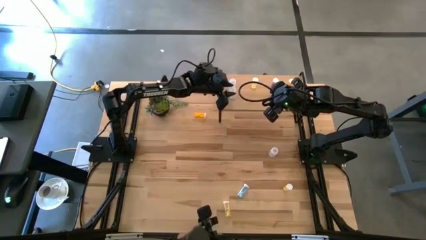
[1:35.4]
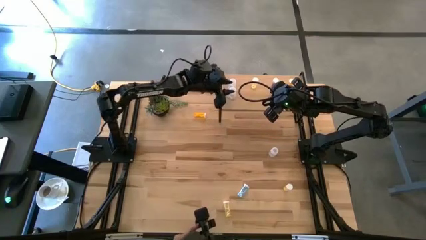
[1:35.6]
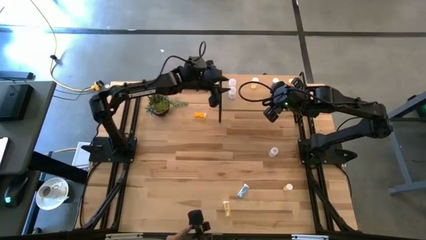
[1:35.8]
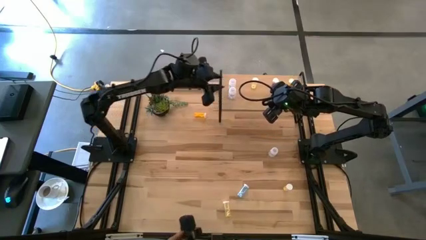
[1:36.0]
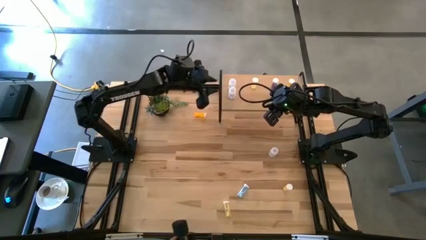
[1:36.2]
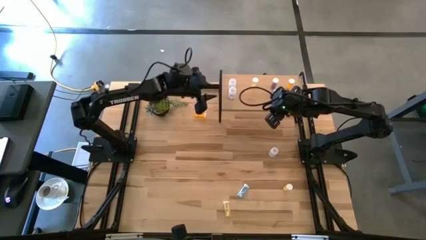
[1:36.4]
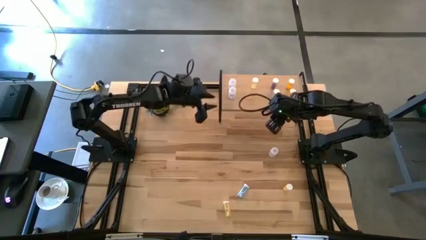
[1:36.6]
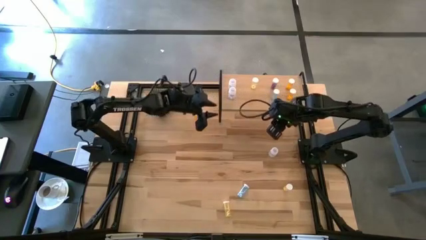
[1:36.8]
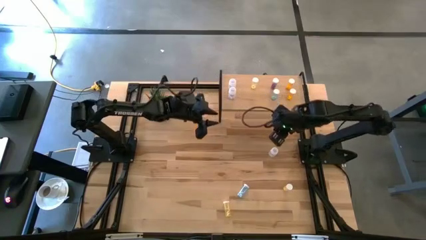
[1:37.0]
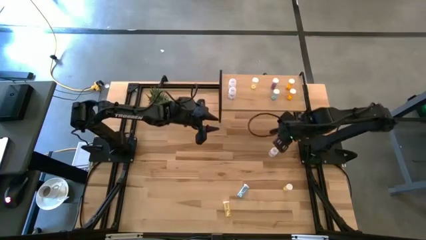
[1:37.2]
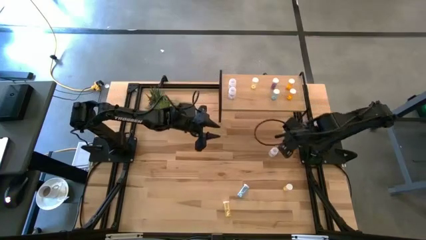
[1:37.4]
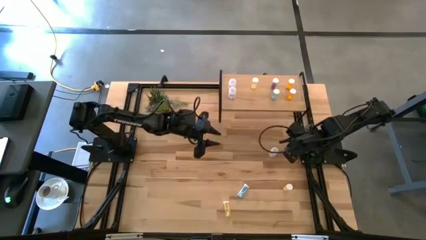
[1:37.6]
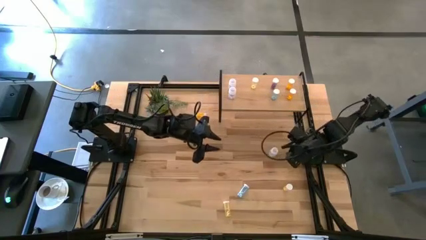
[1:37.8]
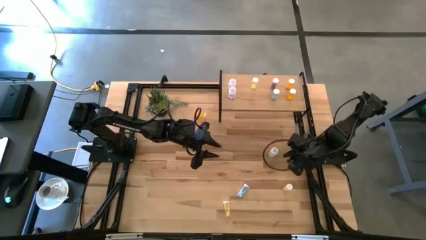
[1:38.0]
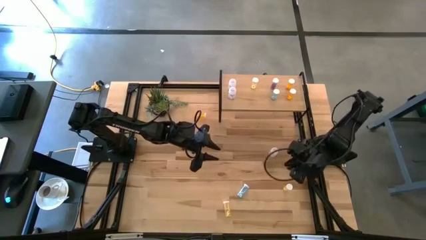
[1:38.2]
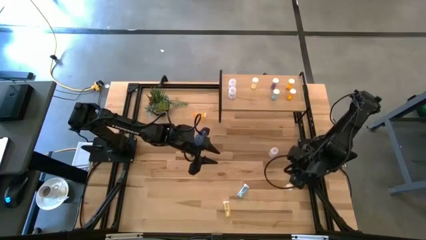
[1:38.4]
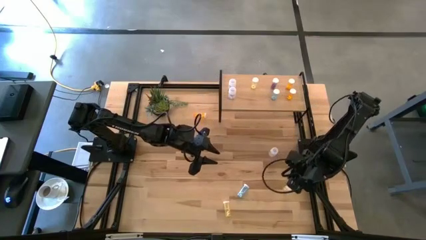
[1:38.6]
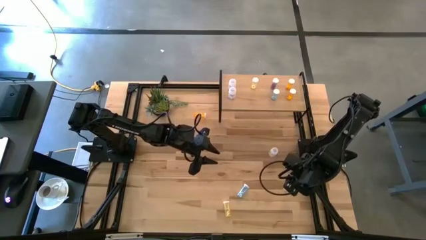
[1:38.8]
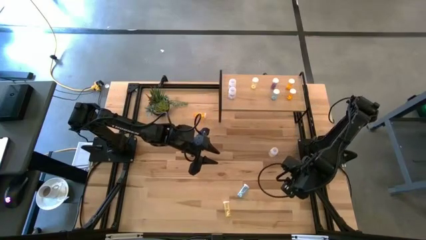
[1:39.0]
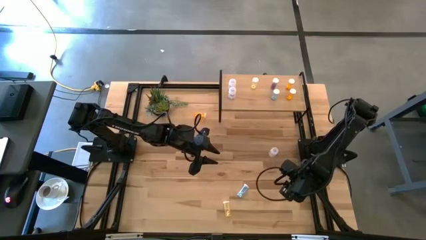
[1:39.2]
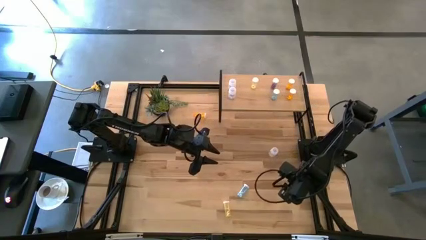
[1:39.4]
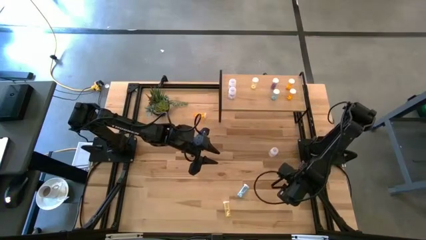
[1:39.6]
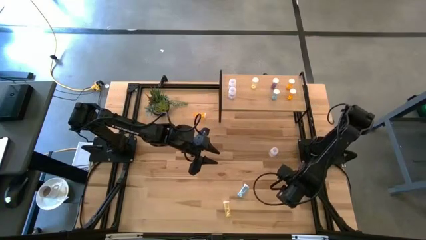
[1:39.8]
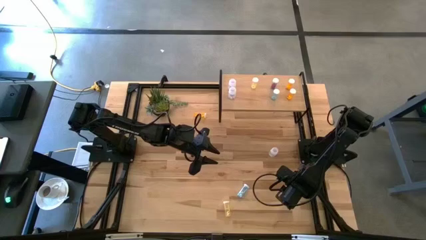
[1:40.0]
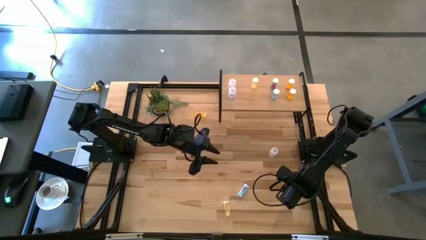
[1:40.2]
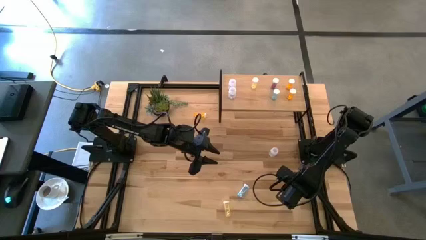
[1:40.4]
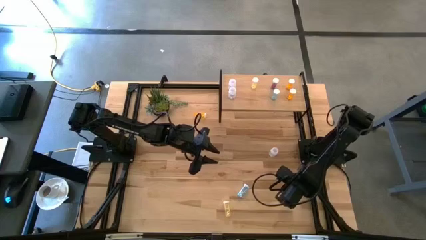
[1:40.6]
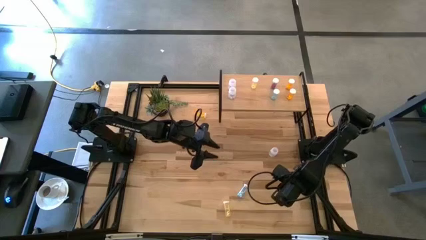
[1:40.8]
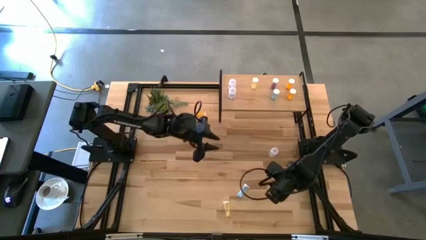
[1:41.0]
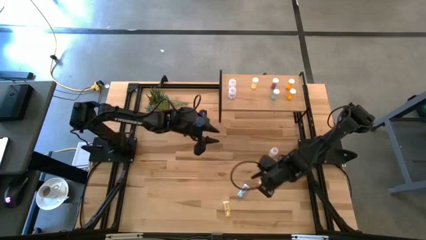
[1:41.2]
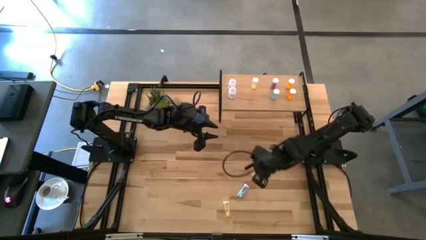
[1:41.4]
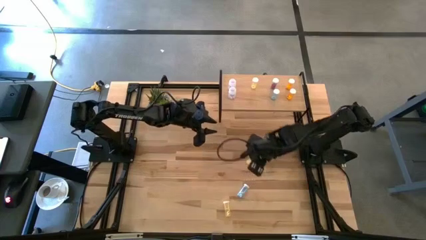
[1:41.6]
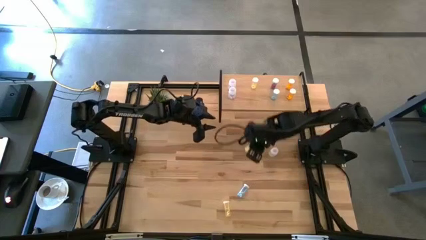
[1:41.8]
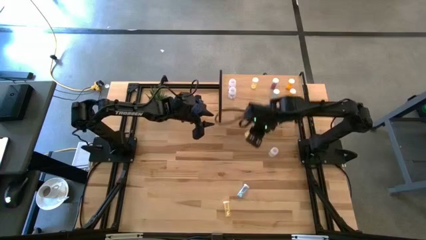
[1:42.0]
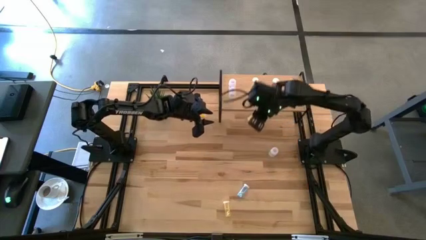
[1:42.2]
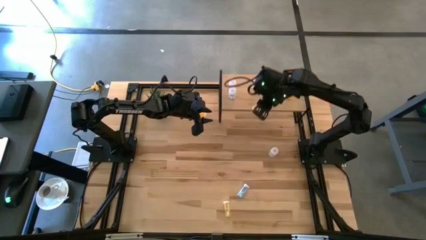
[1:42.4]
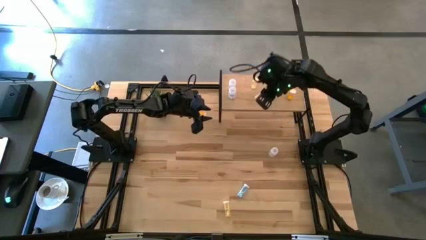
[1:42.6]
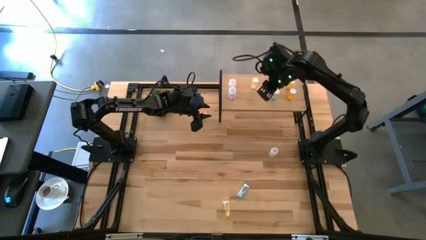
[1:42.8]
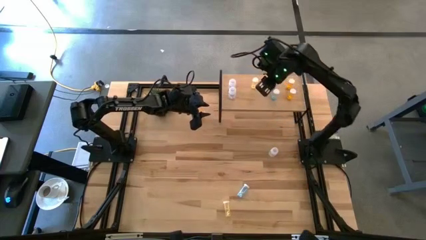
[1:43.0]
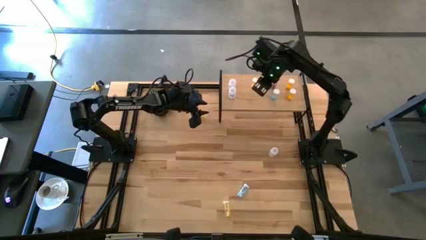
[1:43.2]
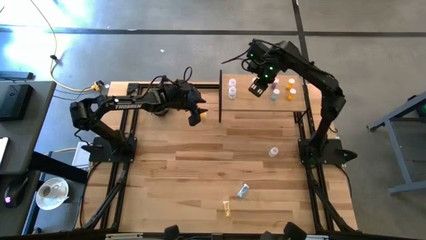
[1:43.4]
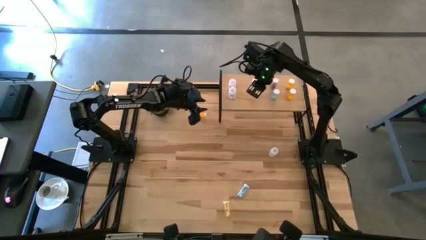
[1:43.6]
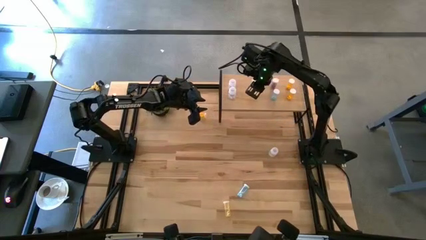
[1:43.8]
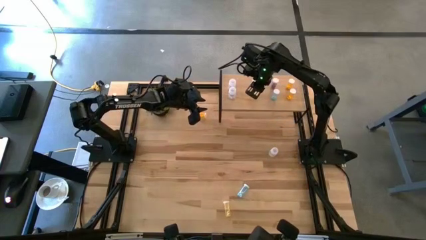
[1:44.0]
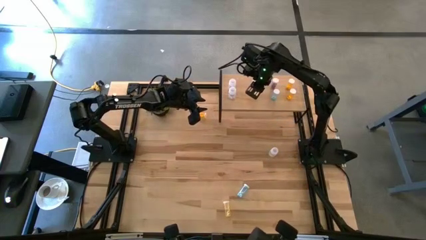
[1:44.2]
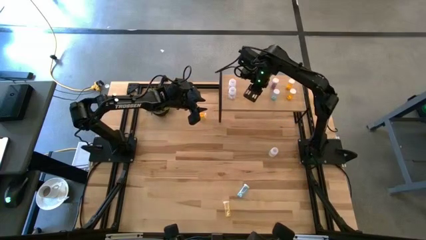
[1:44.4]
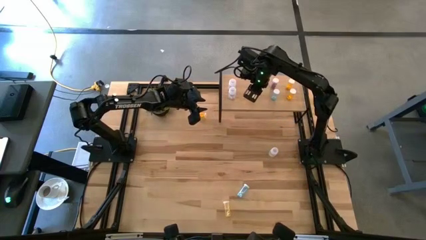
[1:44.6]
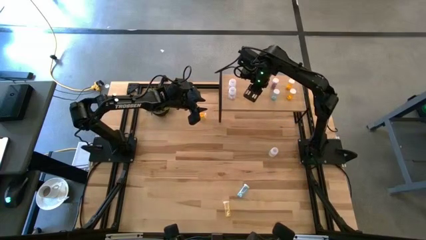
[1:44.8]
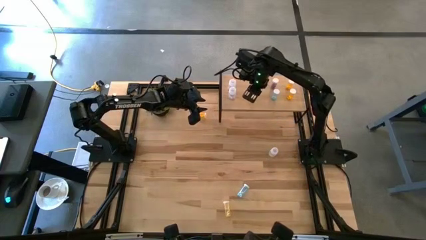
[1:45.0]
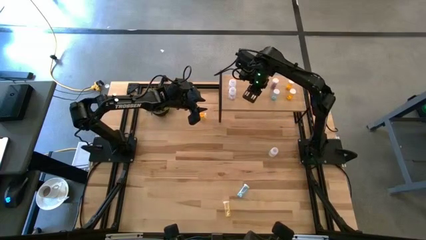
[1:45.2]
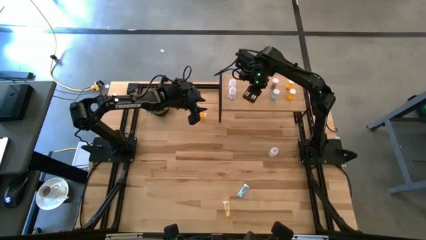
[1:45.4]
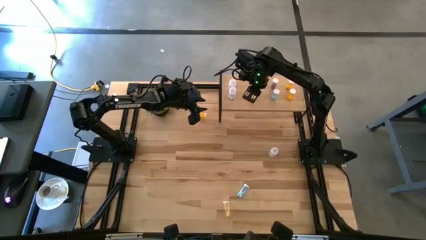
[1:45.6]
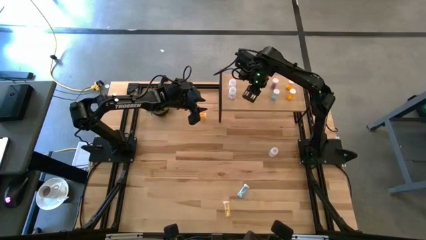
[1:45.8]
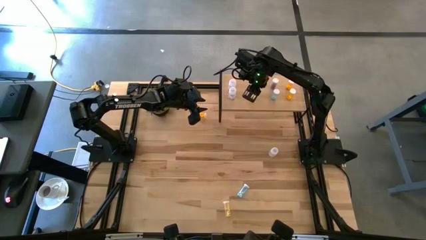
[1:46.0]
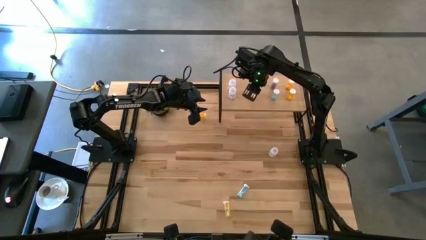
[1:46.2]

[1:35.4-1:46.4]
Task: Pick and place medicine bottles onto shelf by color
Put the right yellow pill bottle aligned with the other yellow pill bottle on the shelf

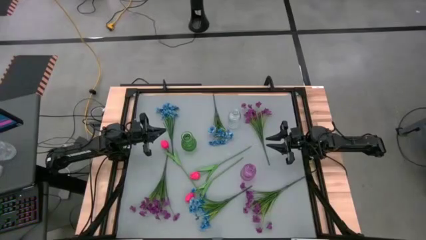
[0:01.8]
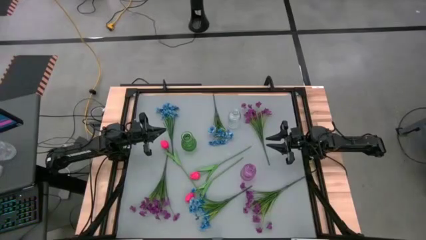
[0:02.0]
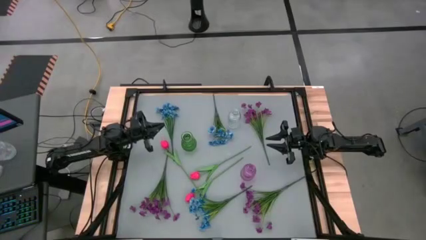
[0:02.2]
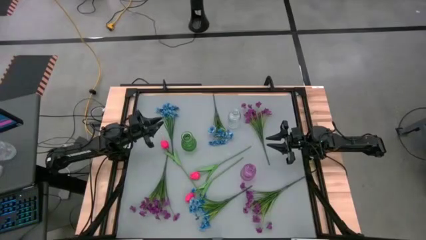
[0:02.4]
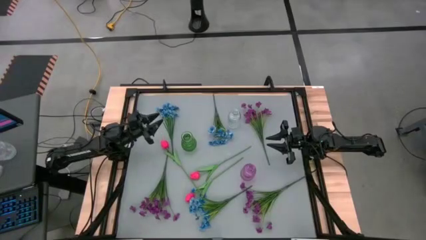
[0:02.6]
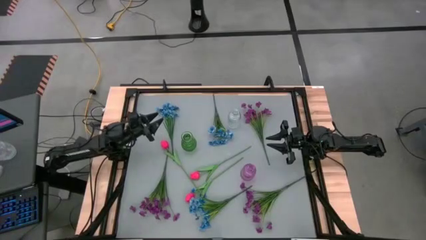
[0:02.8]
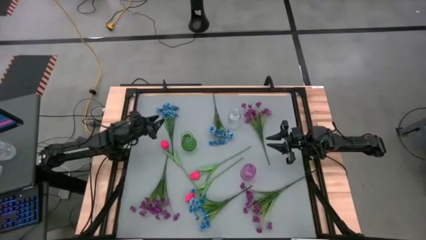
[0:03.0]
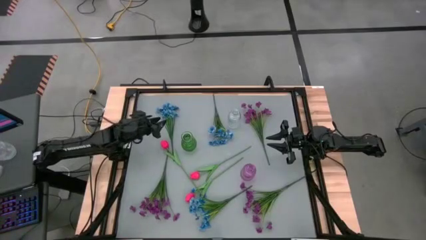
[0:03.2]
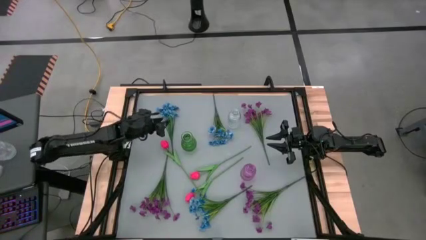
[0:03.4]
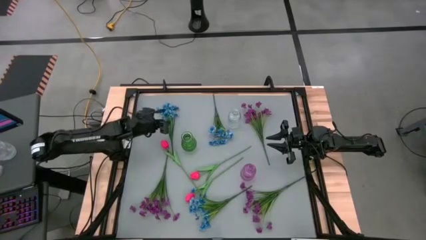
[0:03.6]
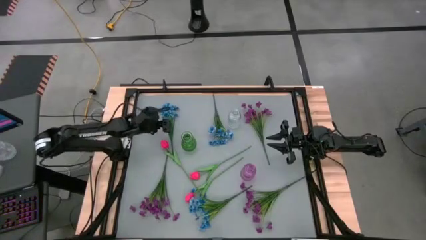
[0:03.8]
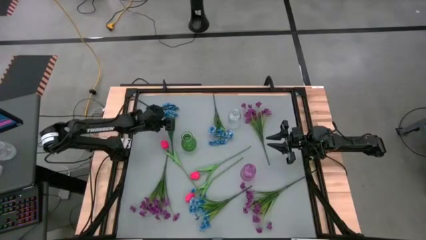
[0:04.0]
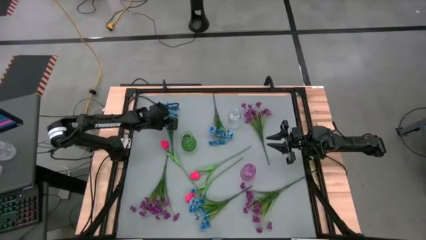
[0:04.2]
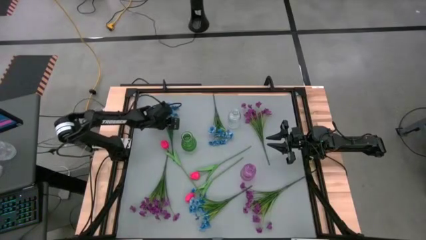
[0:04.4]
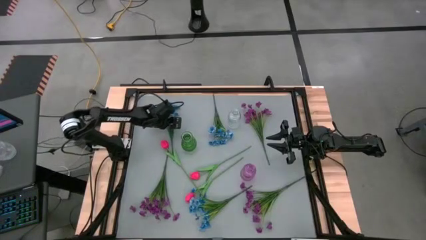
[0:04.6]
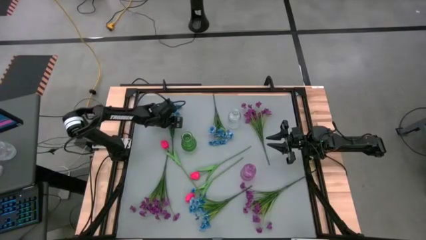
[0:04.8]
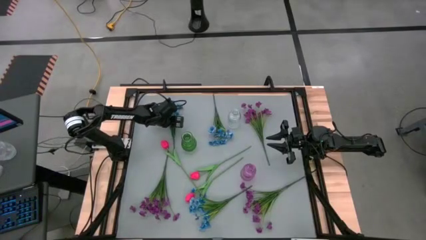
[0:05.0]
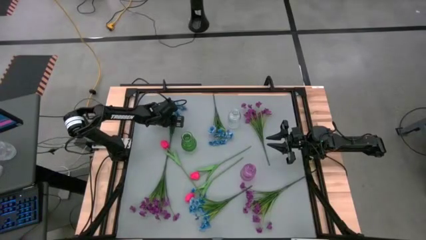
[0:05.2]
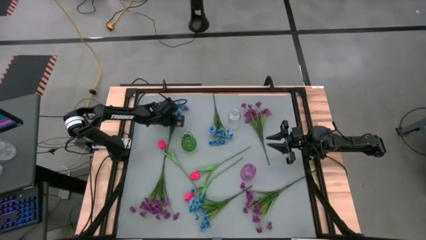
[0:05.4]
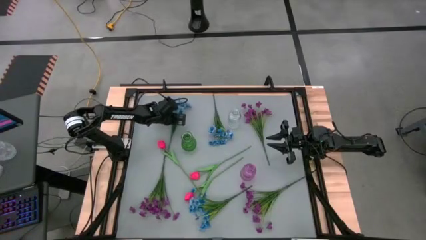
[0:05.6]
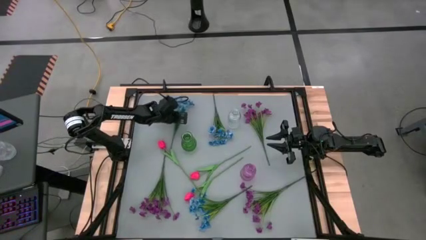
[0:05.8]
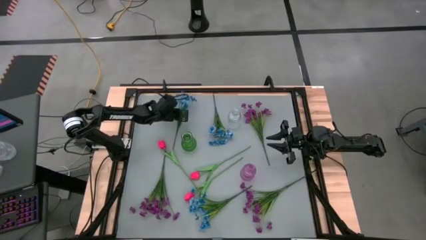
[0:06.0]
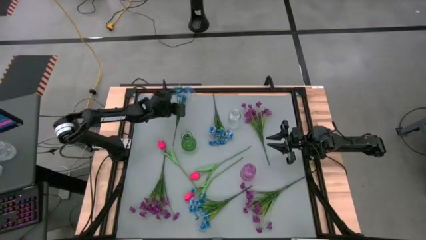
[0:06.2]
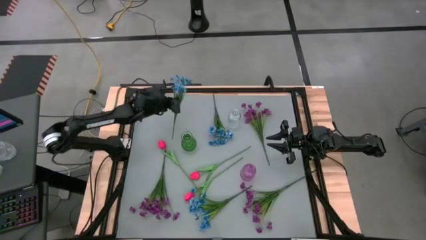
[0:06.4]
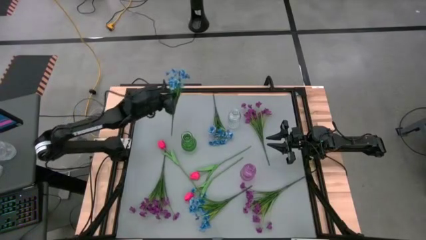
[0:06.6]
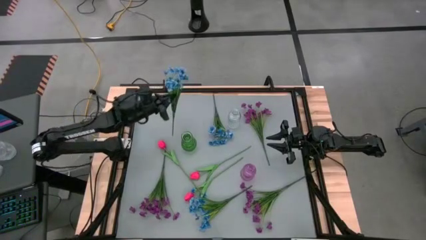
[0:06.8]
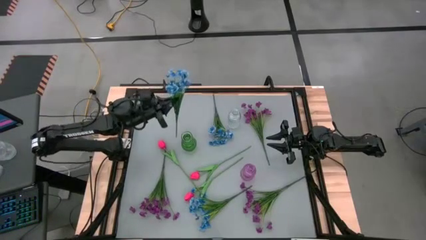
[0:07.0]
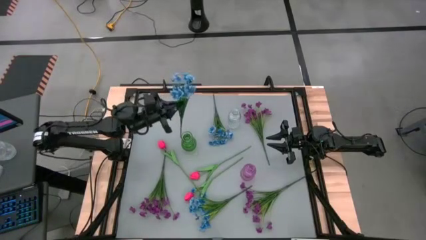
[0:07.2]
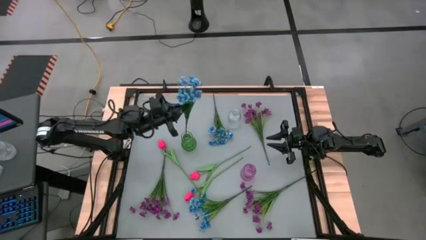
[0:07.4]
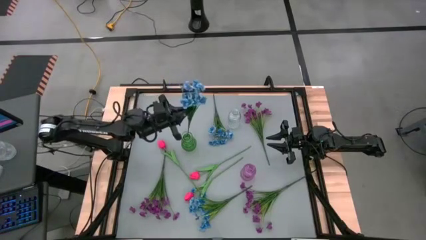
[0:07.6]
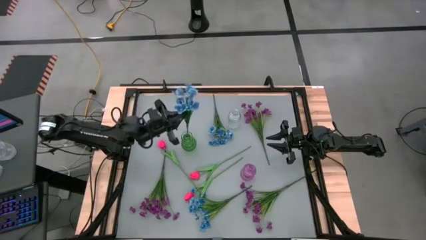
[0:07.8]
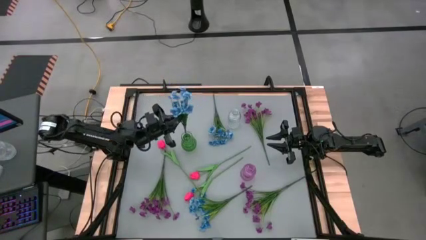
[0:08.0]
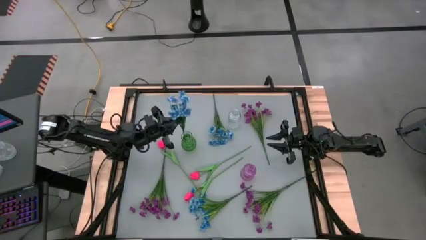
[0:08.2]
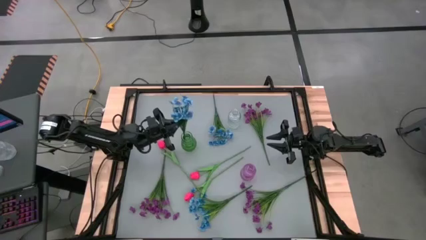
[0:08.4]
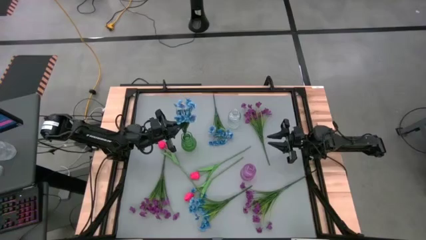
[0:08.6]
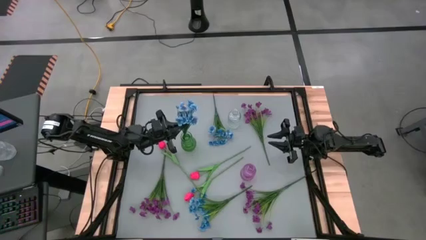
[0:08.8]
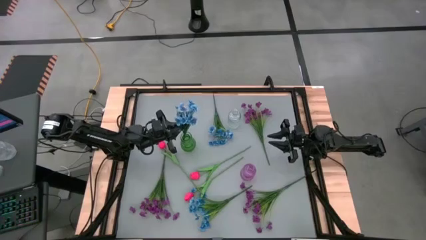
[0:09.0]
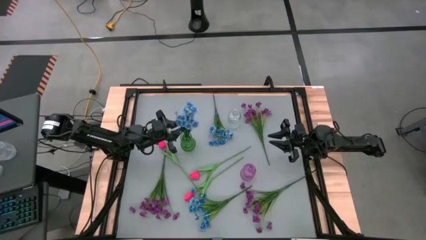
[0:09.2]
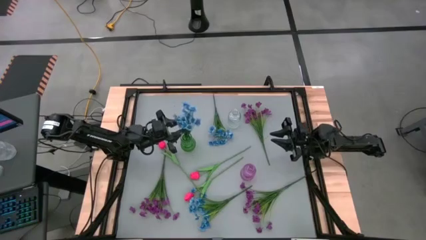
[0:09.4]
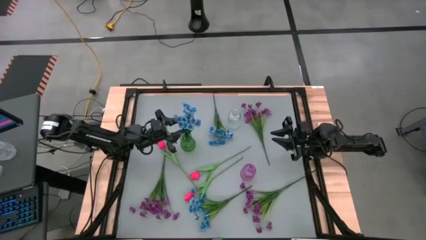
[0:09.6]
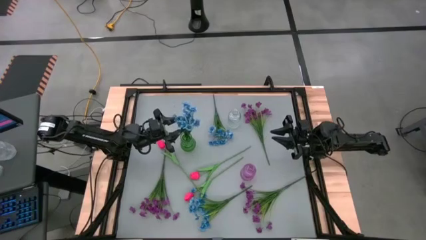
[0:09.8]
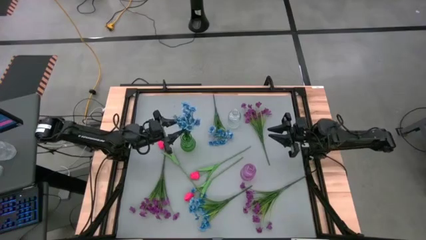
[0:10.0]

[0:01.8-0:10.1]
Task: Sort flowers into vase by color
Put the top left blue flowers into the green flower vase
